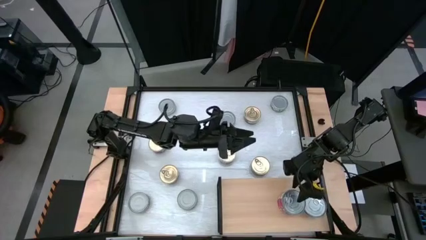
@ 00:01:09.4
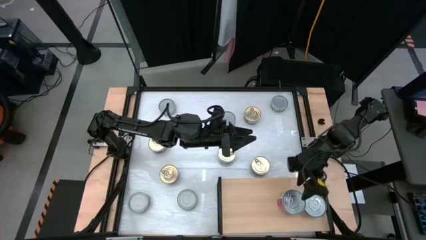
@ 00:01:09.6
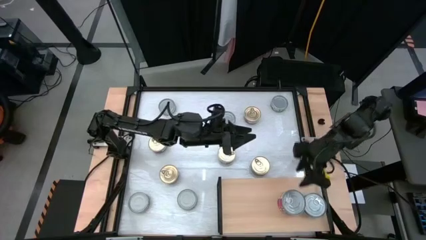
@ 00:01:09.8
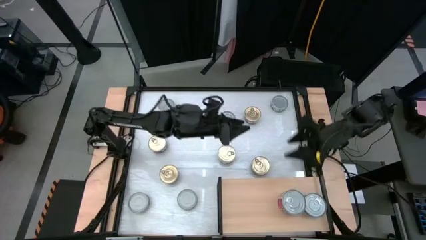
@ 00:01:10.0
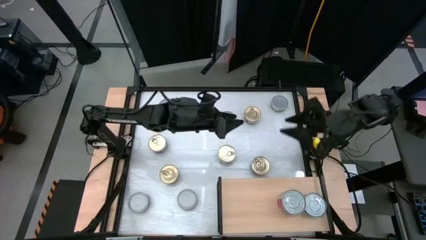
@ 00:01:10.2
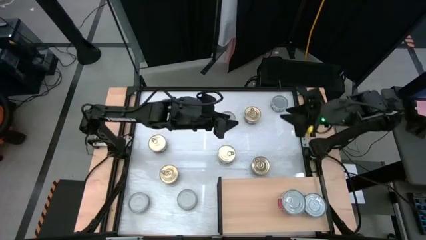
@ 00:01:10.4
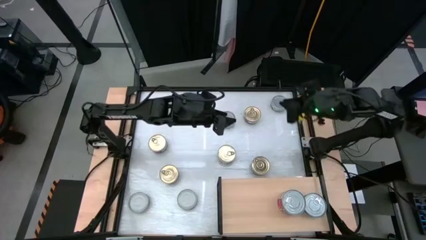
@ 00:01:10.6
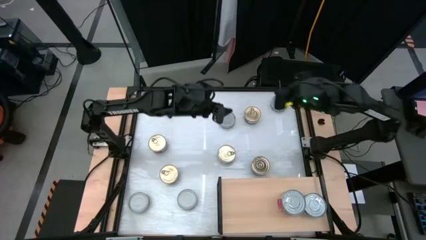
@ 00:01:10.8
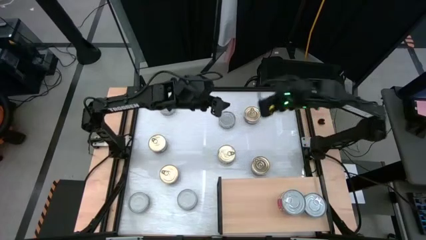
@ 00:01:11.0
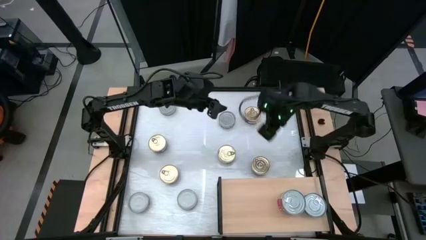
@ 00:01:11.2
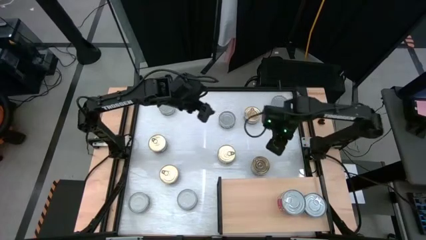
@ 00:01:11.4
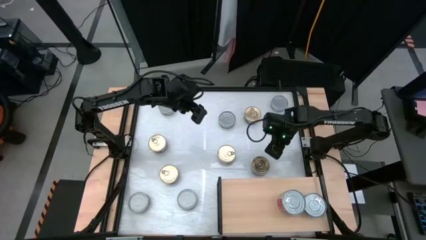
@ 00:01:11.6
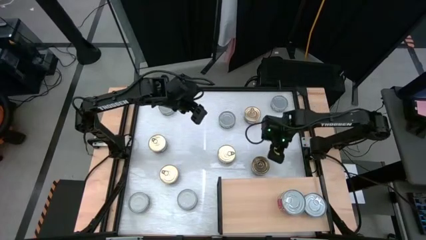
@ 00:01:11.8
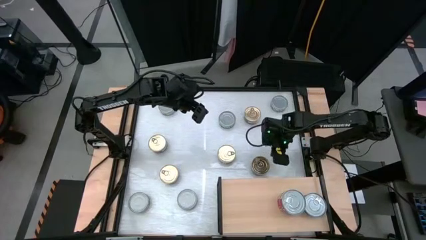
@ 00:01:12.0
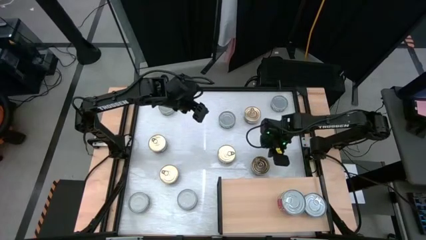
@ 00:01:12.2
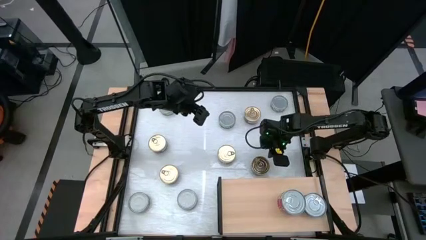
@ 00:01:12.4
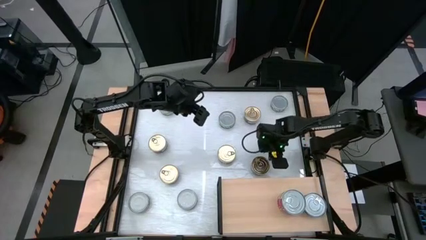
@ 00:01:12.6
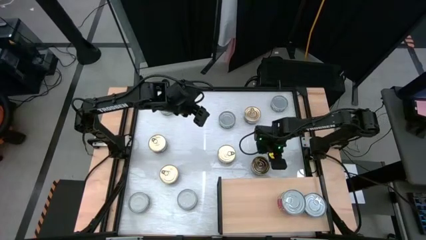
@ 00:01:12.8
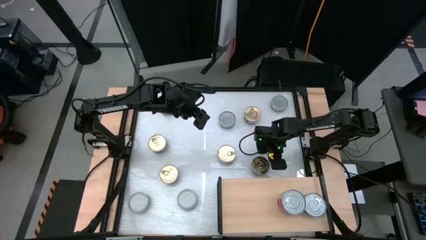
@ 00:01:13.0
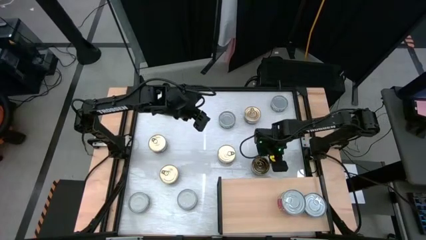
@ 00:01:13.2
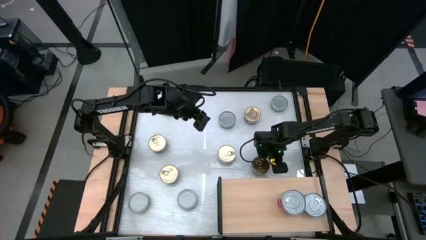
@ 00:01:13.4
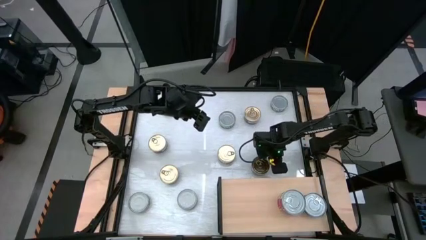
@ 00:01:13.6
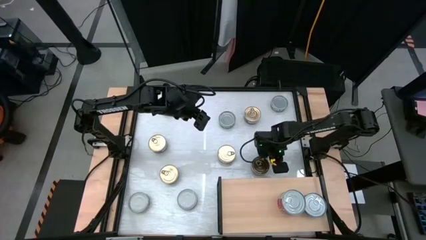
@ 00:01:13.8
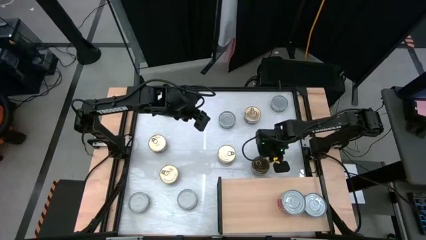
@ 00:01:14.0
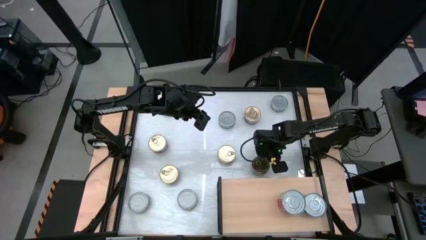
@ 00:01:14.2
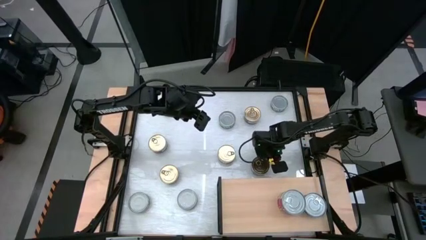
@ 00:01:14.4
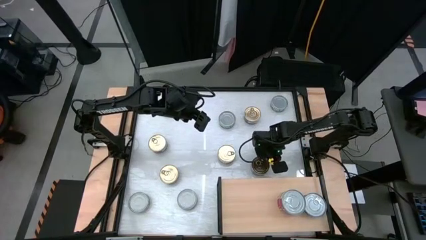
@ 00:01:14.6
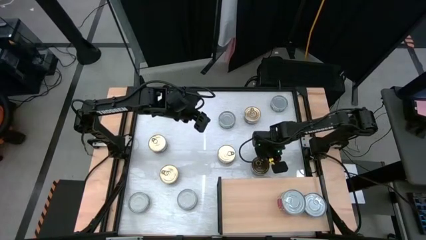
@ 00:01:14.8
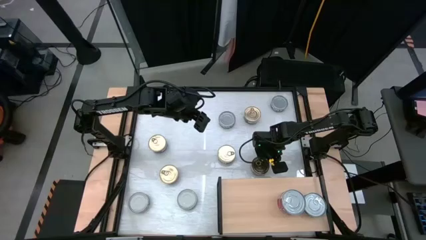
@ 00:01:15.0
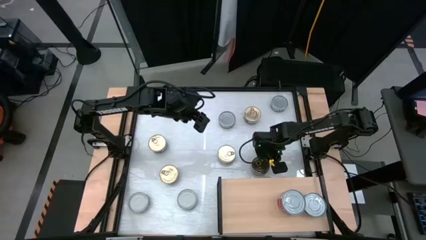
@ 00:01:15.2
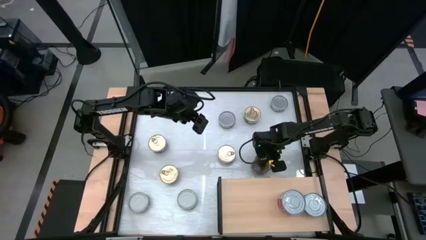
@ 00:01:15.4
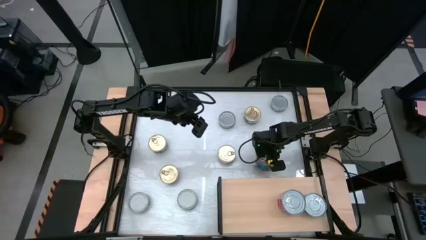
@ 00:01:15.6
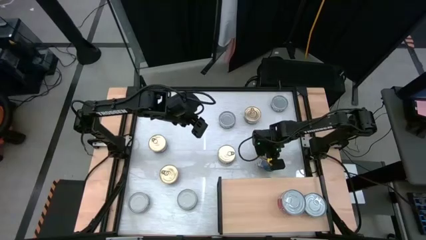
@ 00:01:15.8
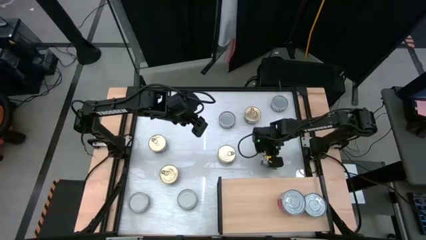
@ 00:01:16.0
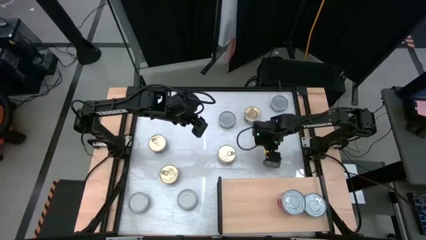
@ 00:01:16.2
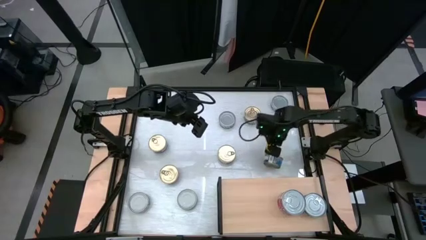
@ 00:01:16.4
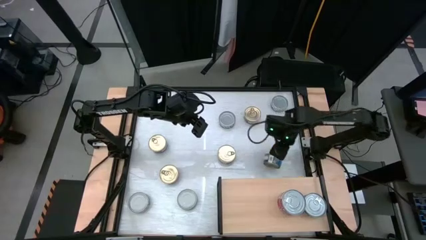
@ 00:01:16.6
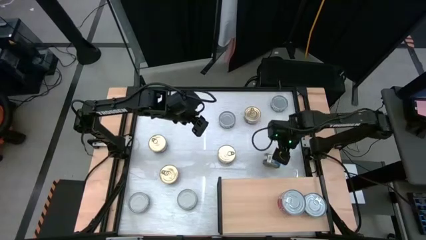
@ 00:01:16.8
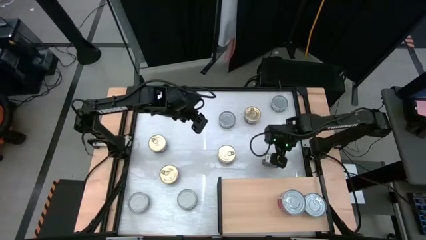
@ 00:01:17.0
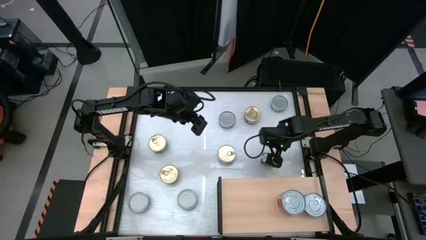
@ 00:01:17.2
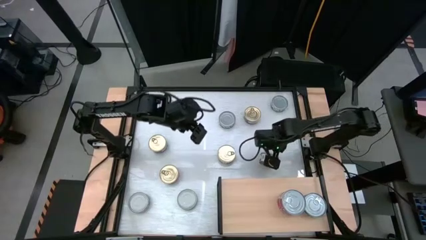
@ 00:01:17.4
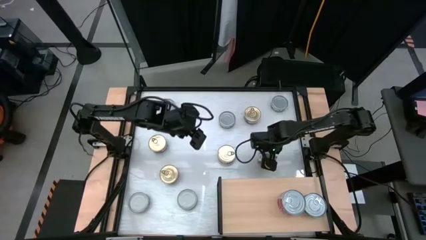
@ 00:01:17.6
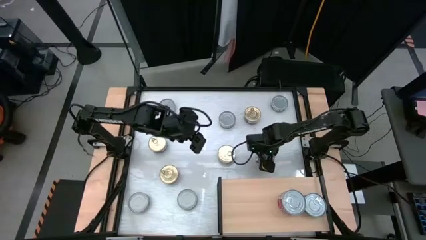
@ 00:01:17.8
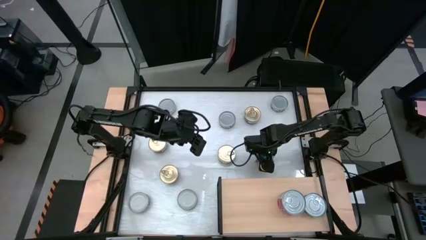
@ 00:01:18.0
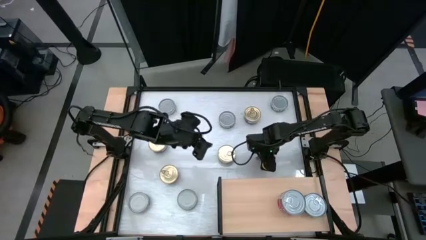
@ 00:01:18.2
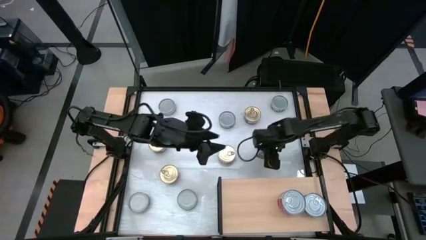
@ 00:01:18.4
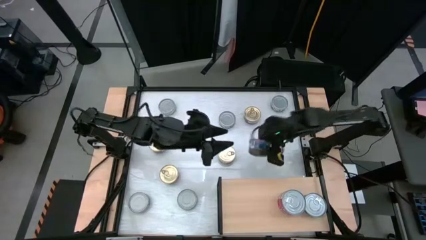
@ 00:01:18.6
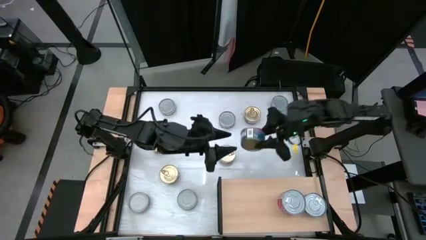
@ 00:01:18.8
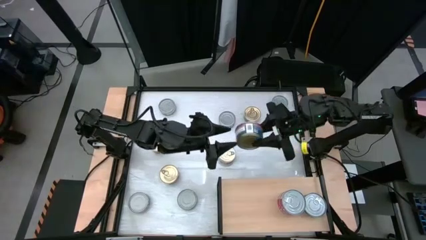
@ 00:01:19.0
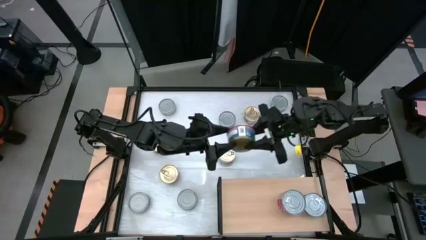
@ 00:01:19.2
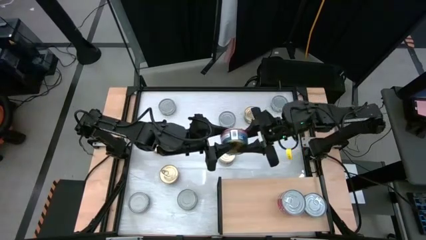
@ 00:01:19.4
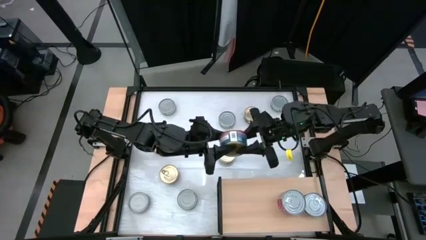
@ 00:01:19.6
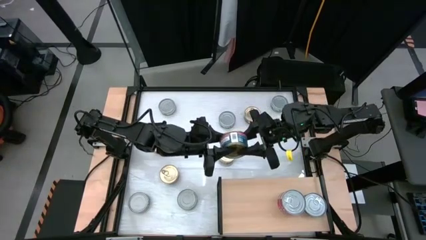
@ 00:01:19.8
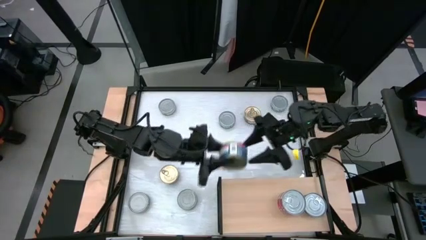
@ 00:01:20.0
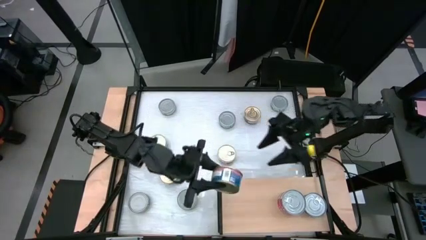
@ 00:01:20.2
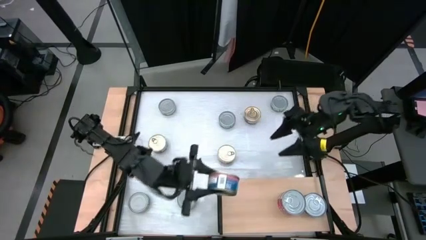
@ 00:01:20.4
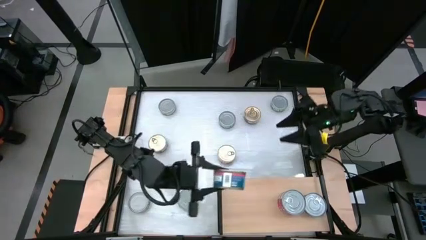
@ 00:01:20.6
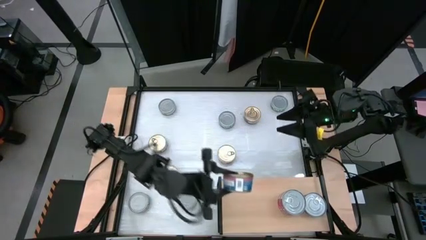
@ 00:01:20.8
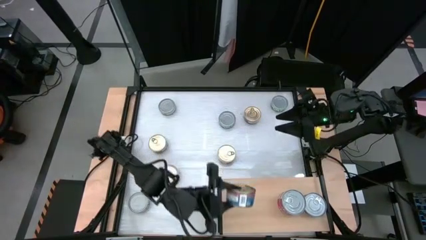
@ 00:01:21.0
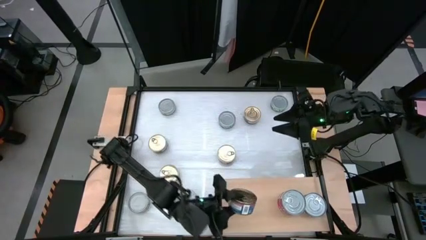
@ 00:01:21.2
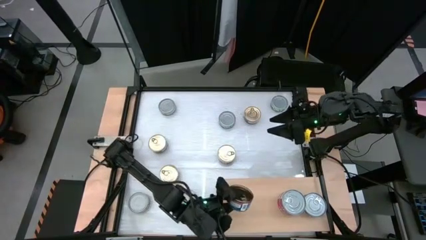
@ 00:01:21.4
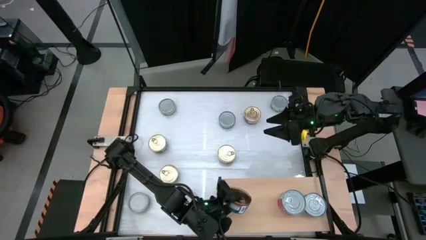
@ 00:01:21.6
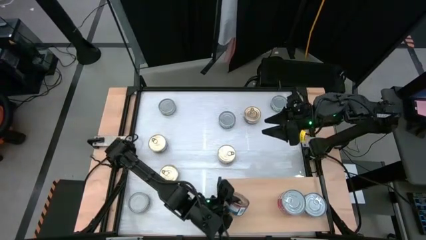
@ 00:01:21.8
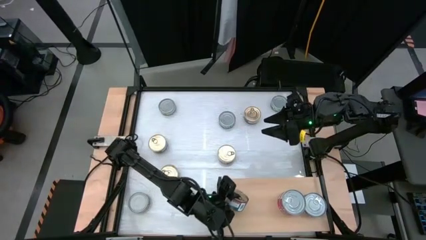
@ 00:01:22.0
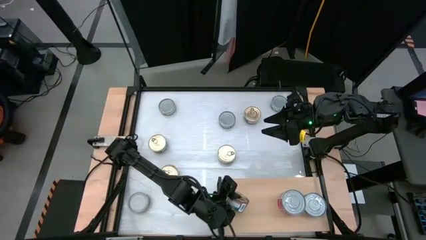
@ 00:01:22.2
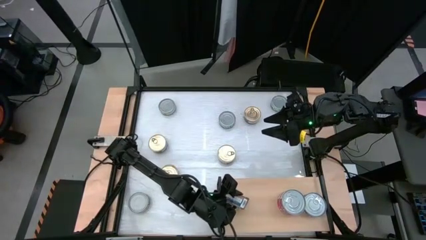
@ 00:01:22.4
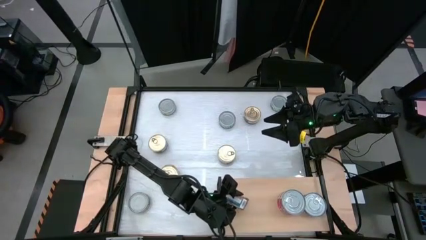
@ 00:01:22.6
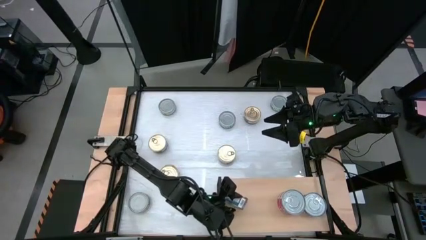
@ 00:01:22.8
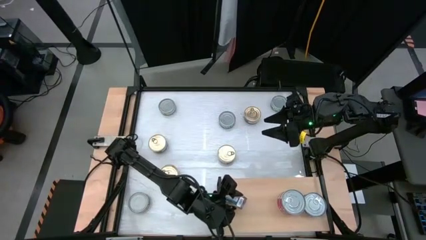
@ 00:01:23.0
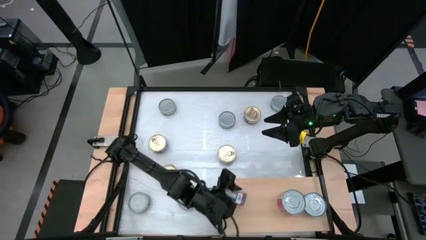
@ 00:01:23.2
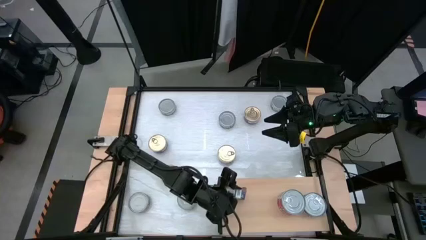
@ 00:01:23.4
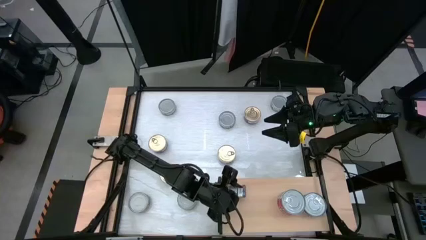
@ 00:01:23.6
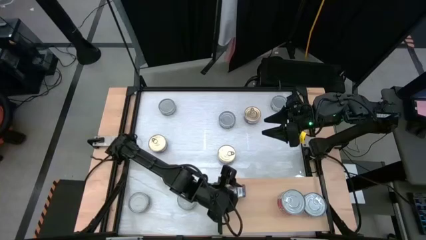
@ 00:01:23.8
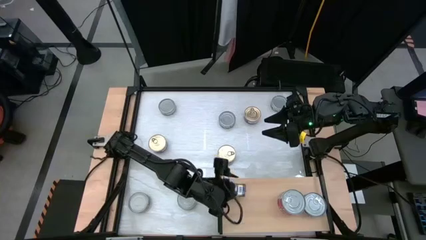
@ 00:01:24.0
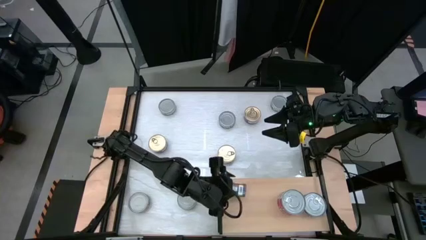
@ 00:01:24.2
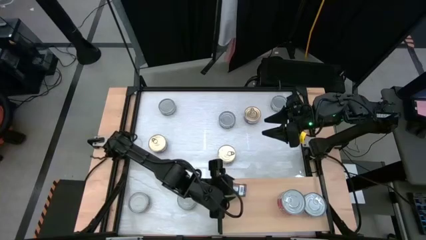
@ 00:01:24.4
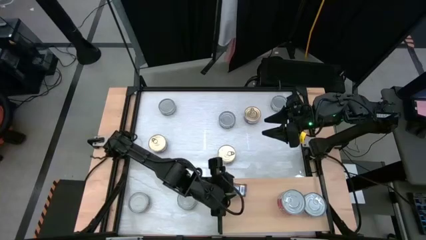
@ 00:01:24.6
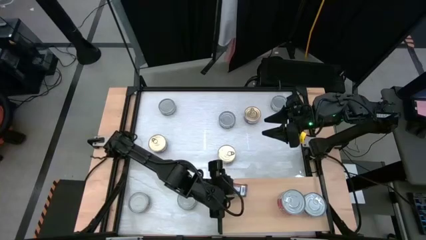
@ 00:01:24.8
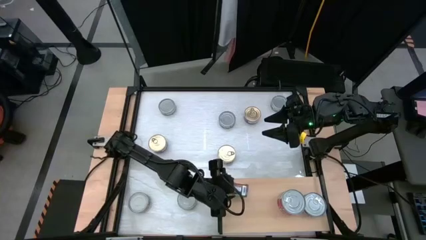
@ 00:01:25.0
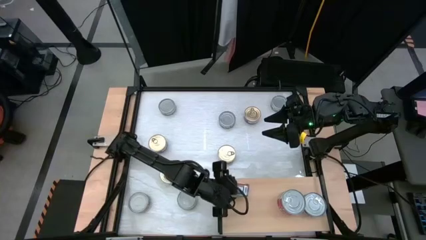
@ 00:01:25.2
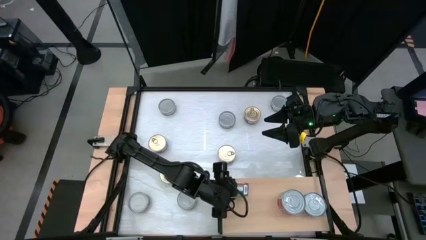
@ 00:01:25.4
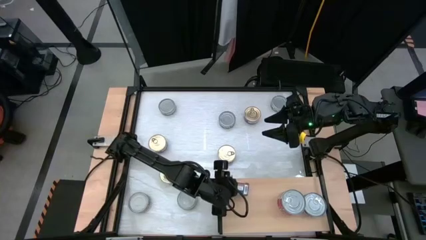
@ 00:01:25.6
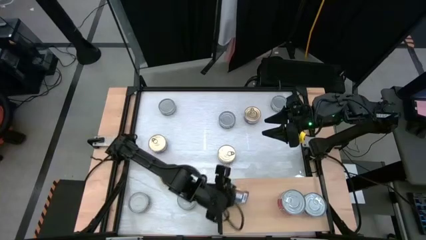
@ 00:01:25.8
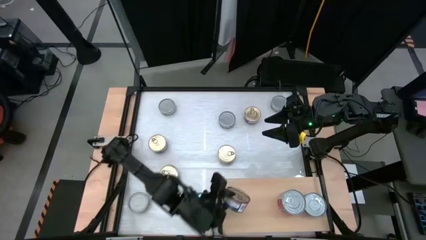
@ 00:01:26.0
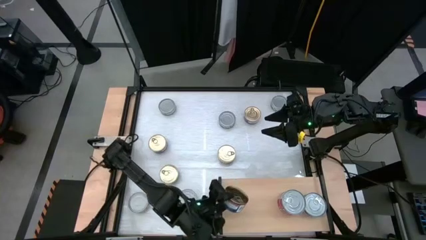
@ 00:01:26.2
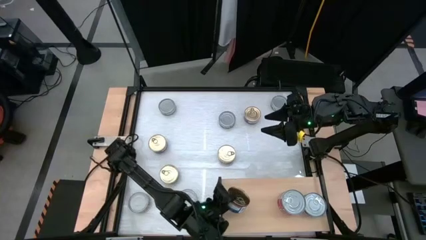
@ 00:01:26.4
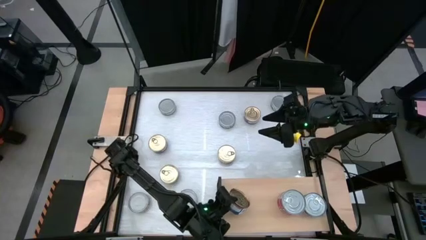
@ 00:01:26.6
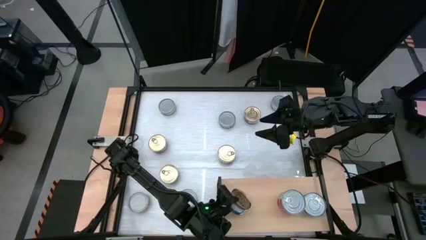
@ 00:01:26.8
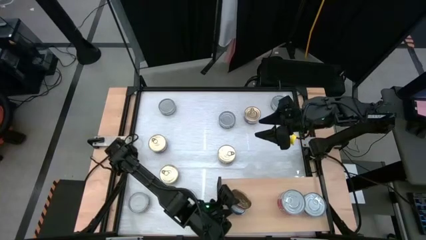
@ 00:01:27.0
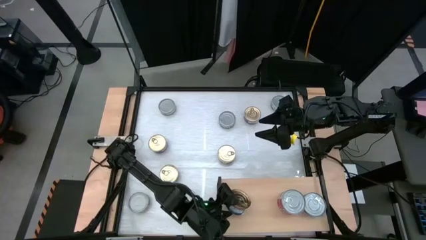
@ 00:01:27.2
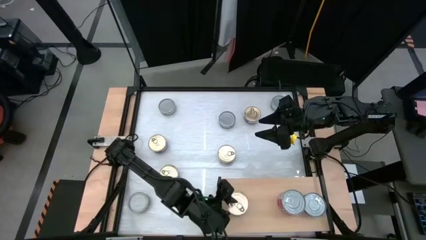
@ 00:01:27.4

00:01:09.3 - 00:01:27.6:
Task: Stack canned seafood by type on shelf
Put the blue-pink tuna can on the shelf
